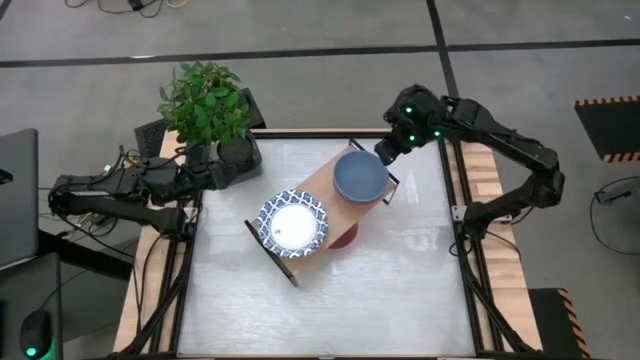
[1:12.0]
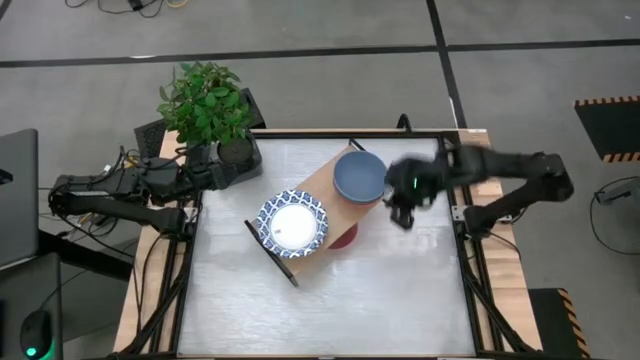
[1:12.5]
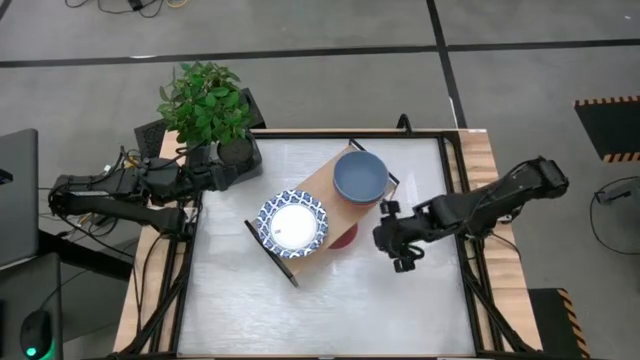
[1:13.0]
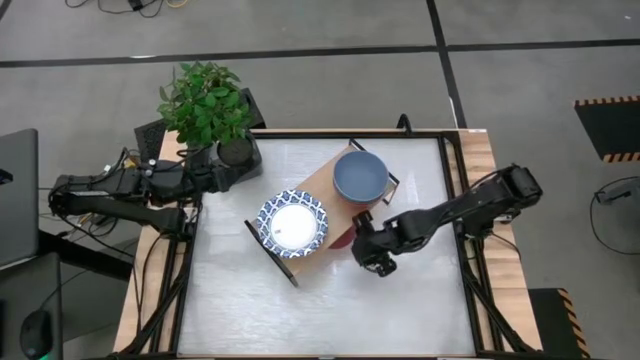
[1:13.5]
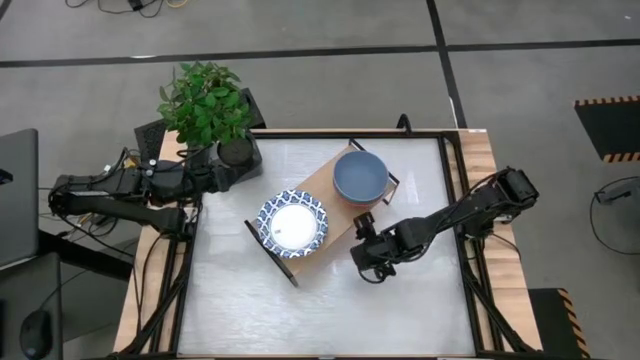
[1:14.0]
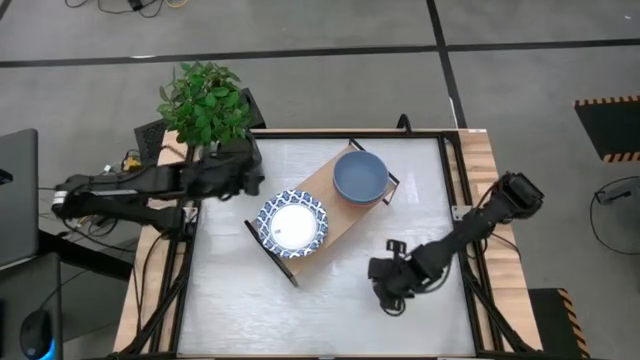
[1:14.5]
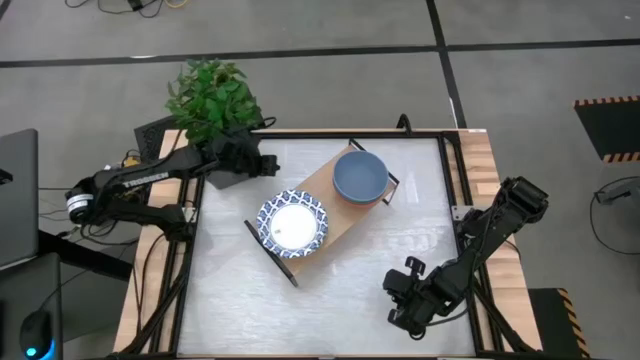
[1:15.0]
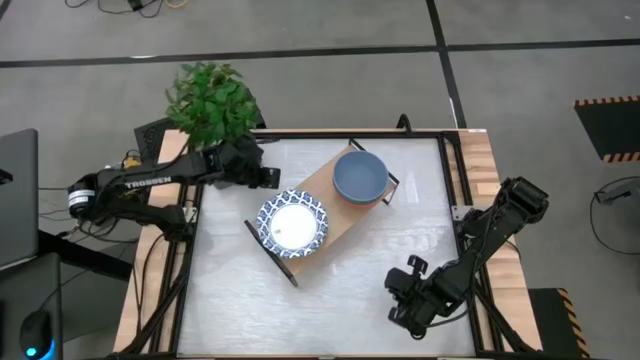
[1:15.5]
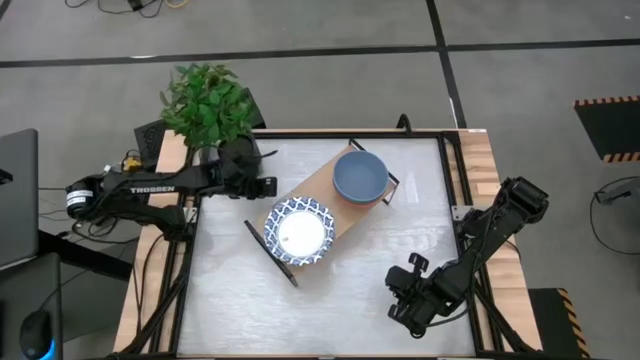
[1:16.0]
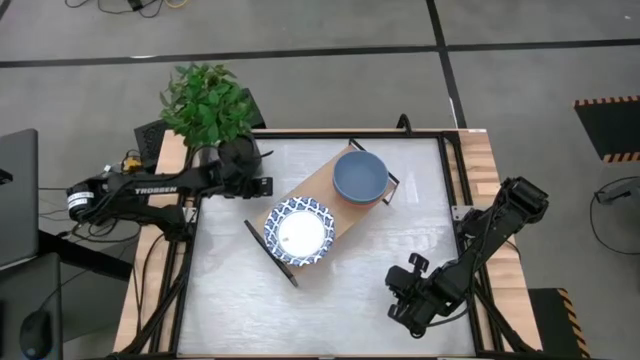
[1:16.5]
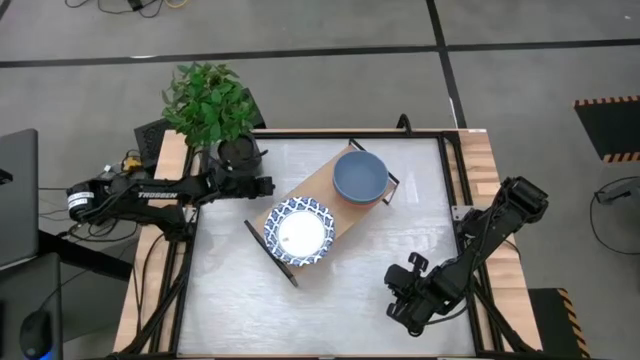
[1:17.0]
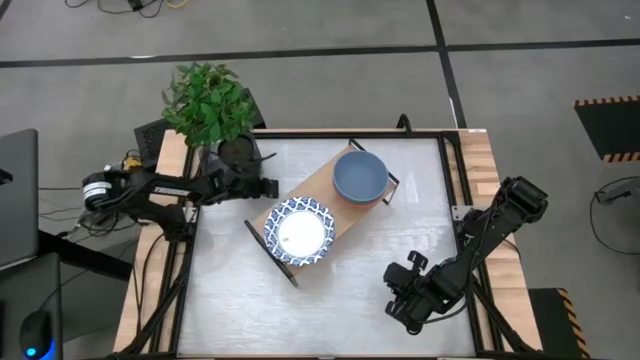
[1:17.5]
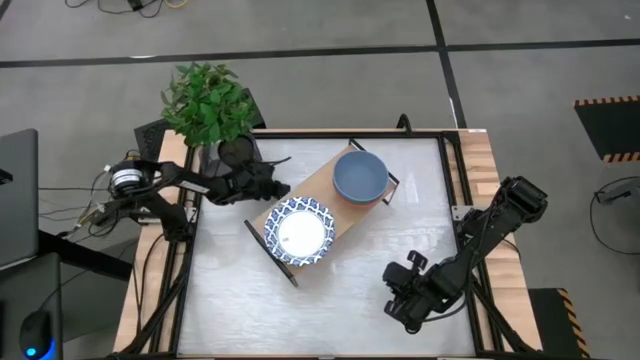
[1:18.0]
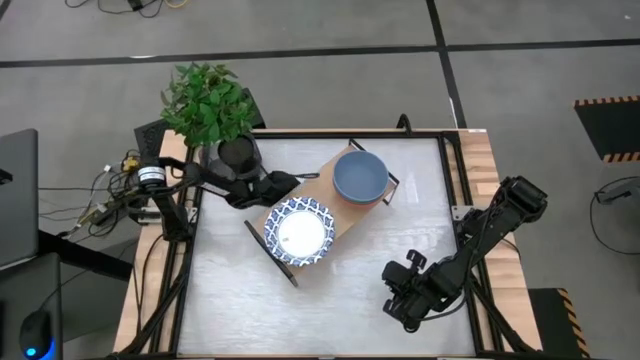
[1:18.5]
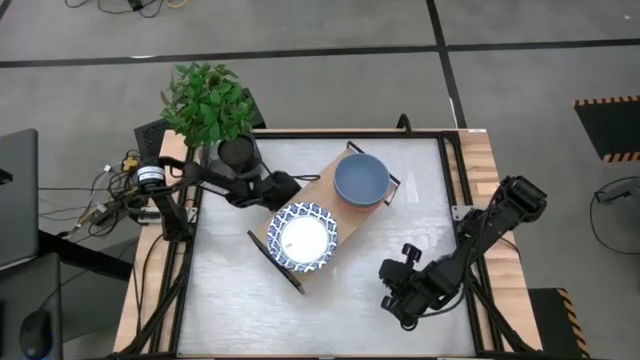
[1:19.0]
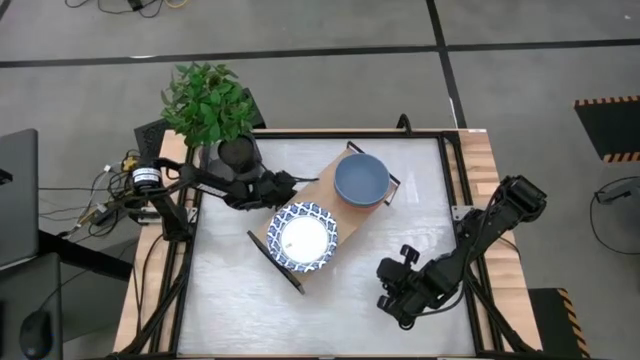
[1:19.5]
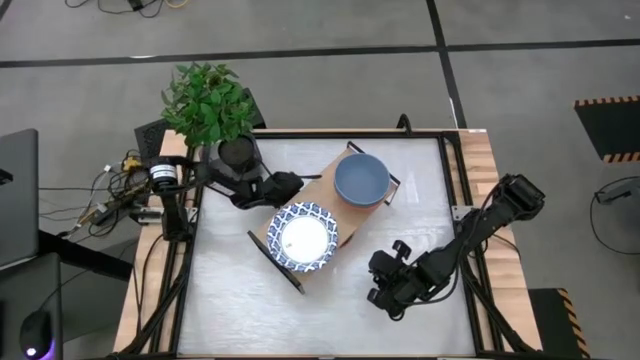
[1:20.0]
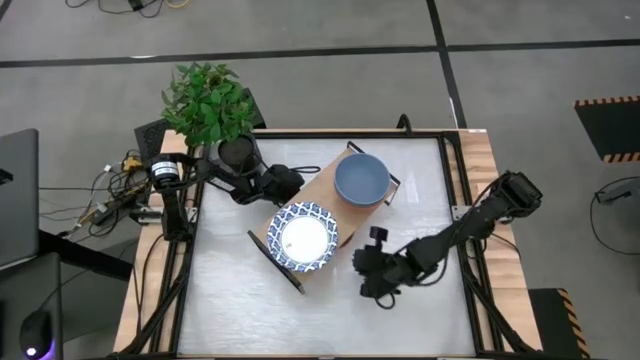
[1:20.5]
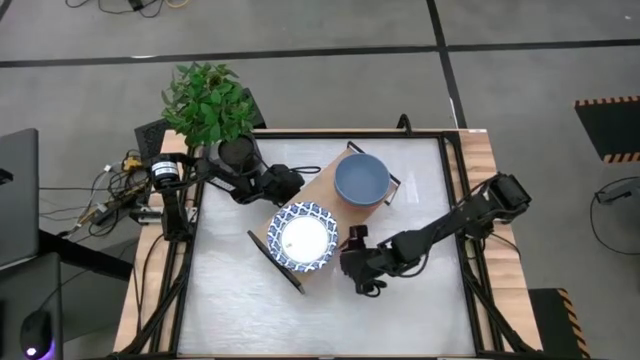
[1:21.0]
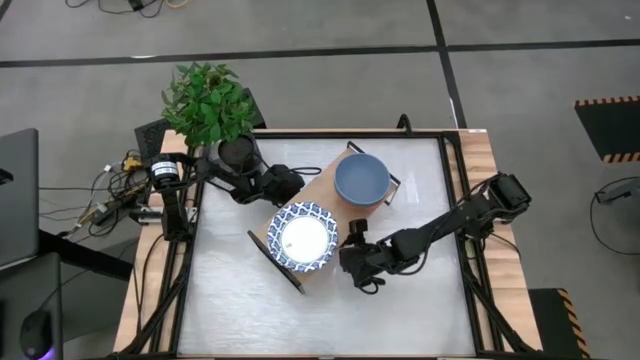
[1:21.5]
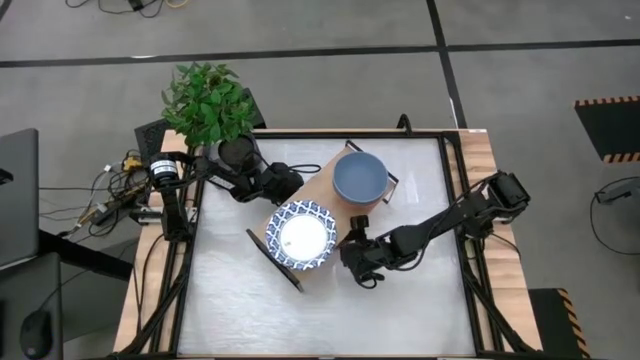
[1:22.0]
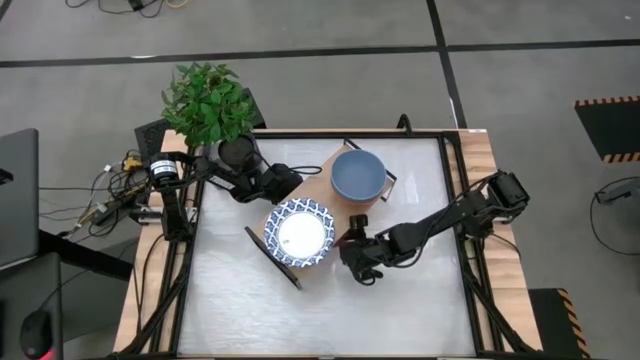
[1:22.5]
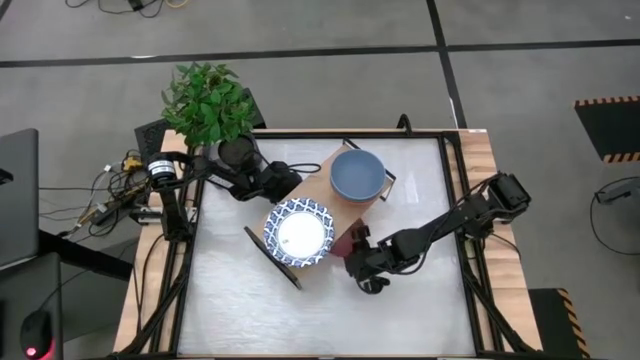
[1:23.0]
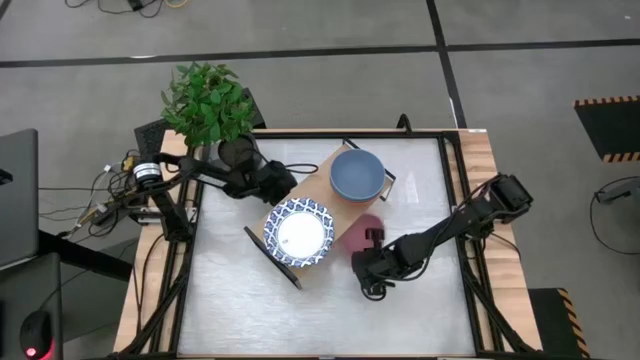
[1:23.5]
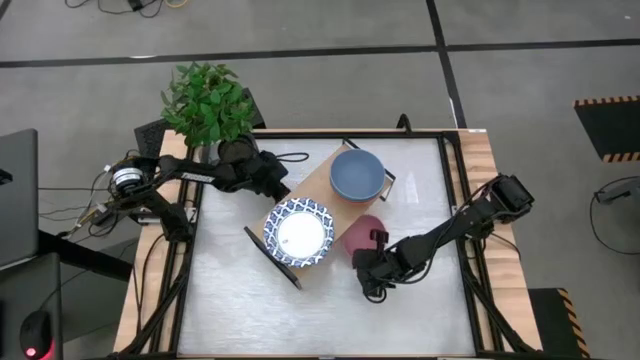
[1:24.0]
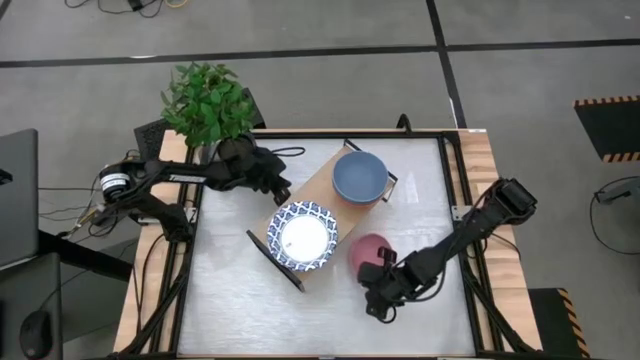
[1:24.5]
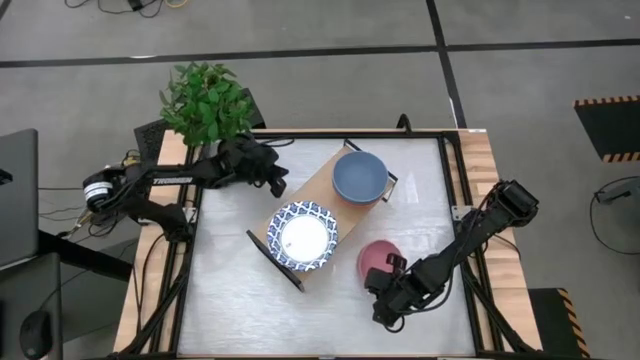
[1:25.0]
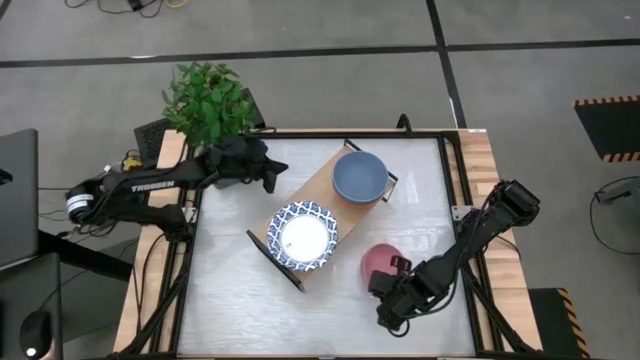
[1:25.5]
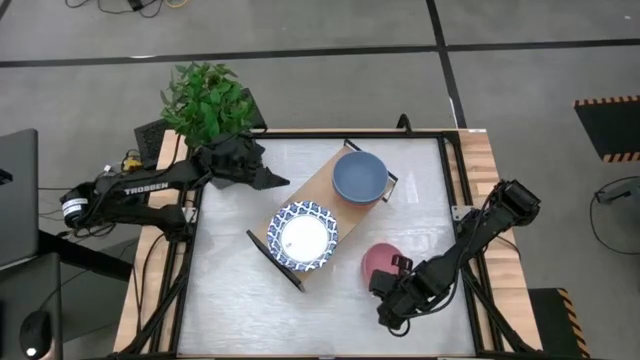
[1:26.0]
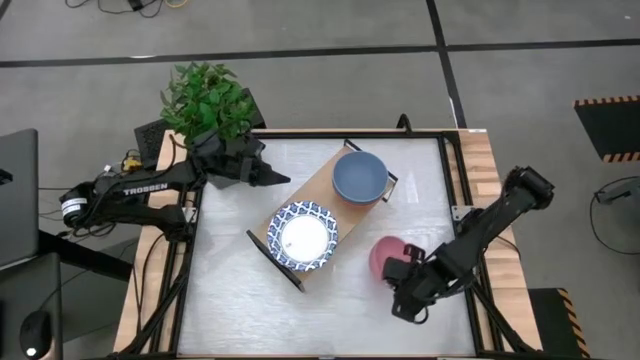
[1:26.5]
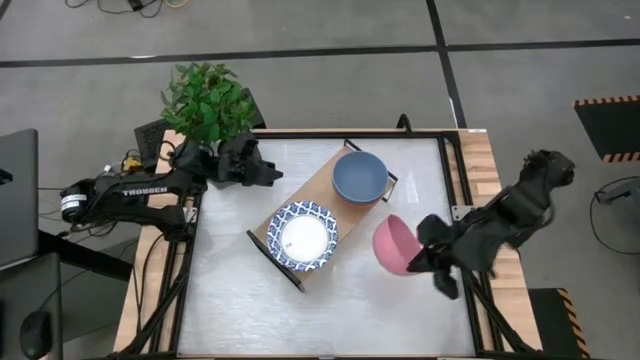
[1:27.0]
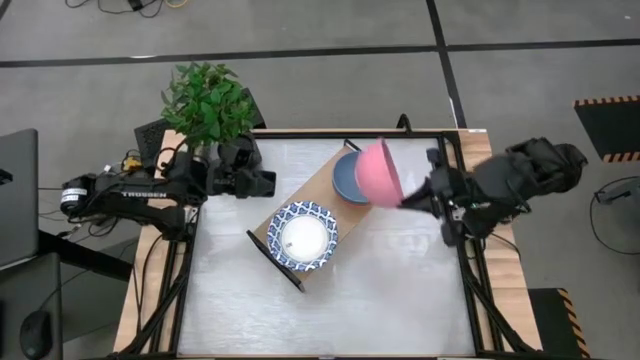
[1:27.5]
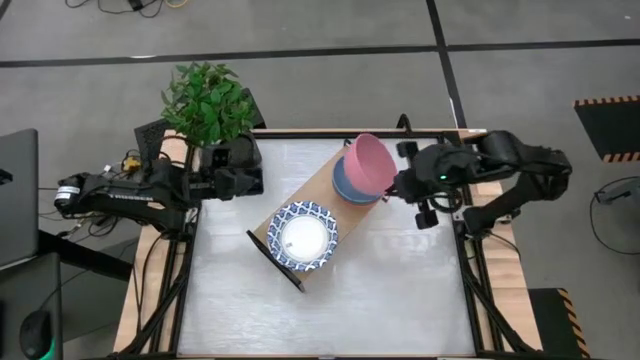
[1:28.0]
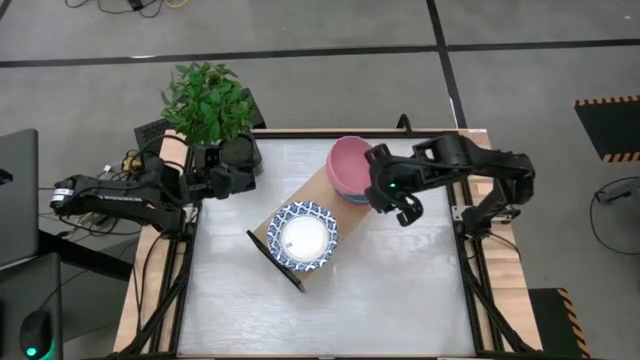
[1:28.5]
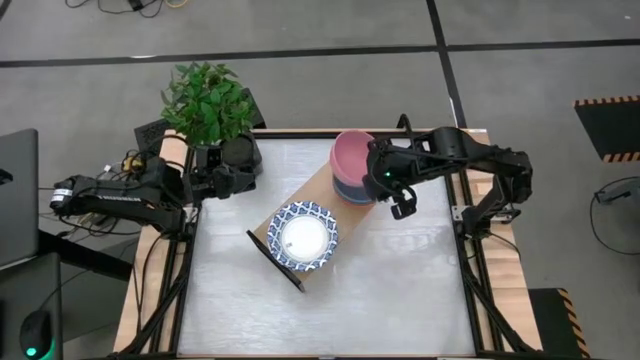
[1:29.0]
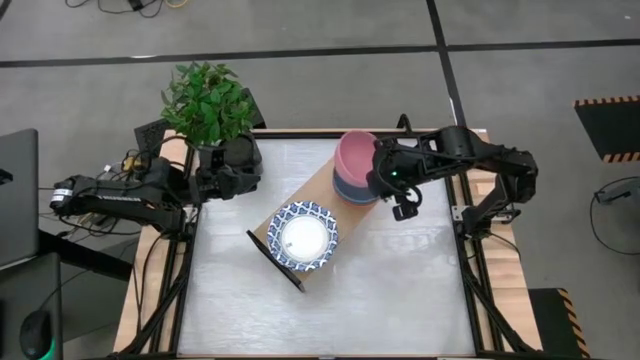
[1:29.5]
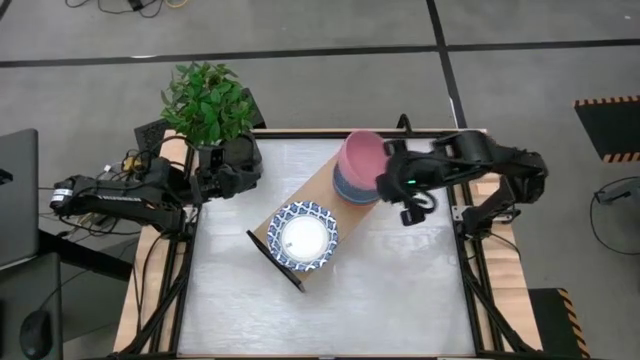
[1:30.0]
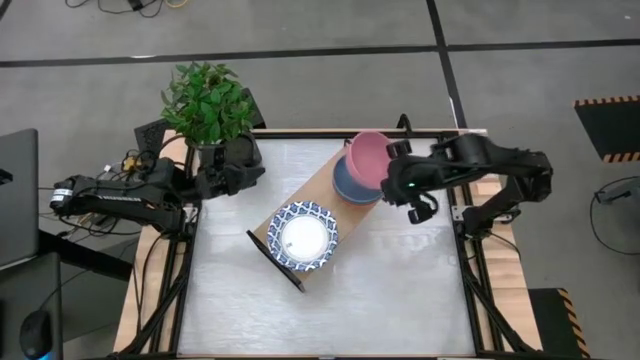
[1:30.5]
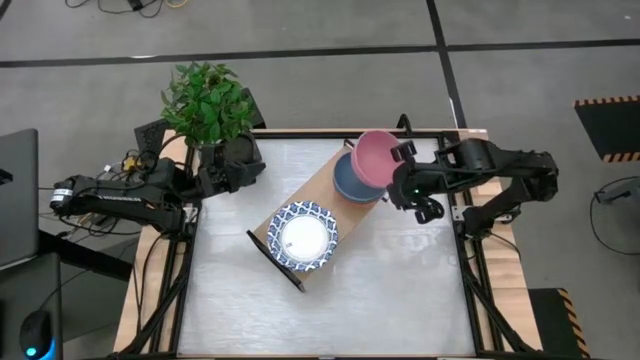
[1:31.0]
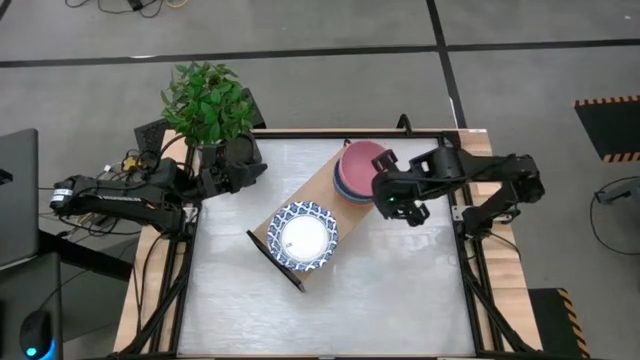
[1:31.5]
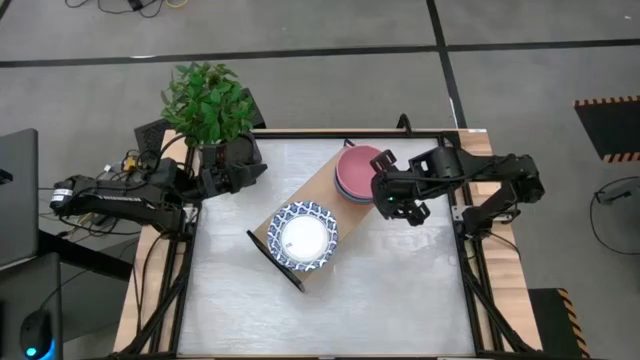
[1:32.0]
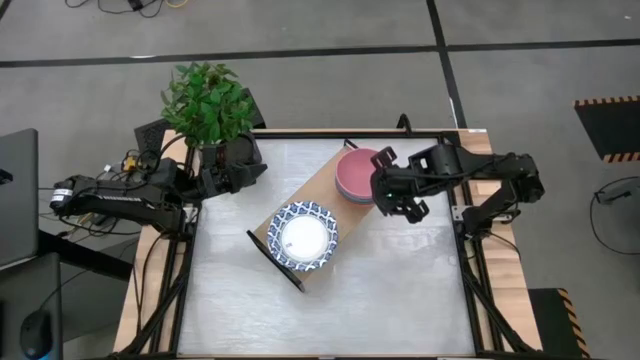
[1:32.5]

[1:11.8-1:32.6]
Task: Place and stack bowls onto a shelf
Stack the pink bowl on top of the light blue bowl on the shelf
